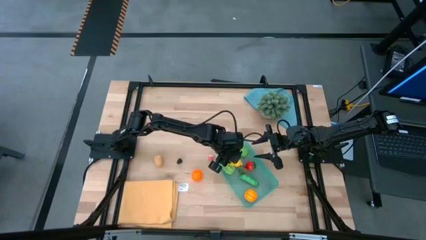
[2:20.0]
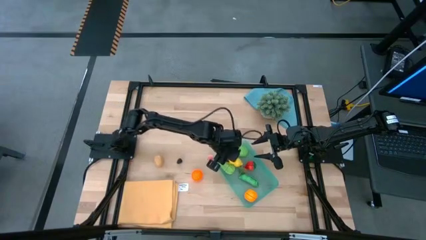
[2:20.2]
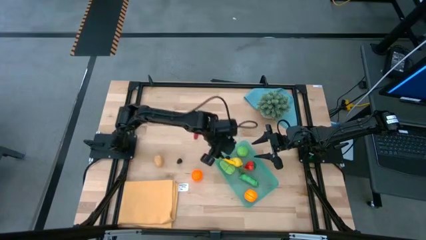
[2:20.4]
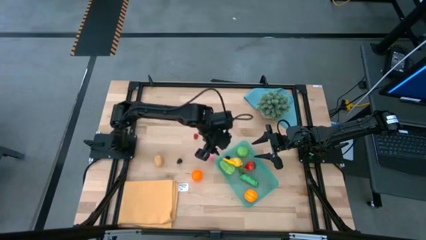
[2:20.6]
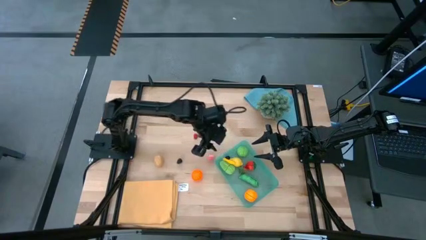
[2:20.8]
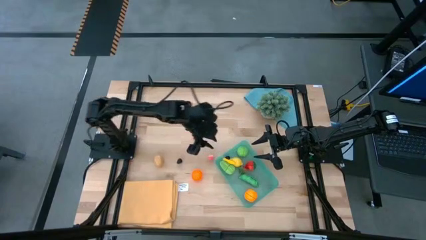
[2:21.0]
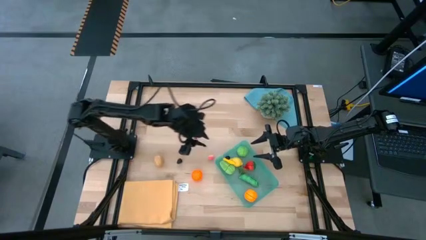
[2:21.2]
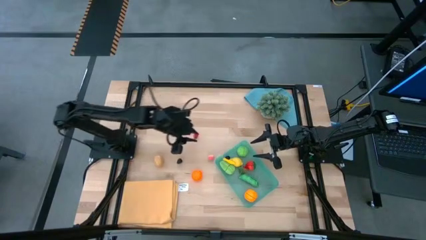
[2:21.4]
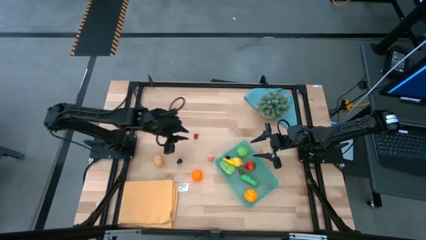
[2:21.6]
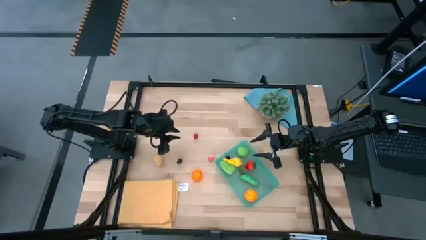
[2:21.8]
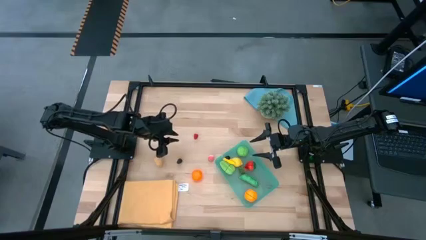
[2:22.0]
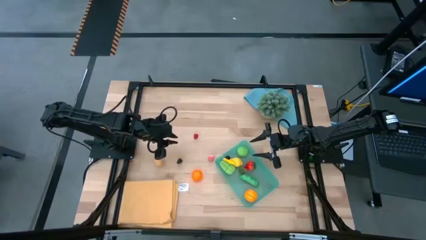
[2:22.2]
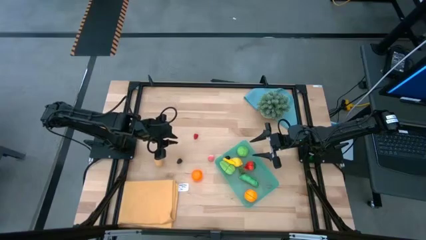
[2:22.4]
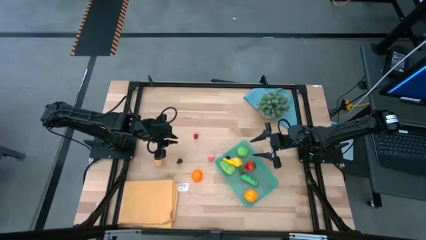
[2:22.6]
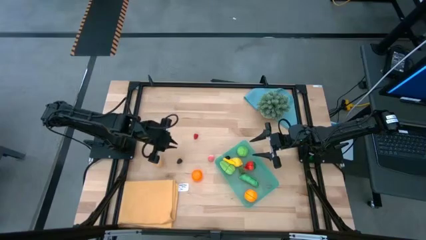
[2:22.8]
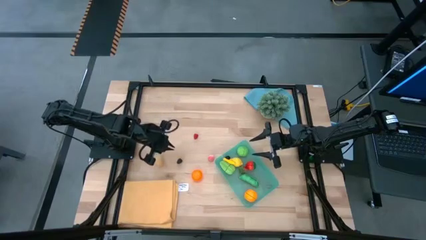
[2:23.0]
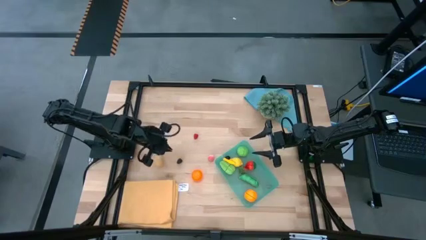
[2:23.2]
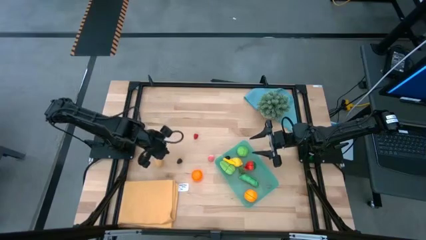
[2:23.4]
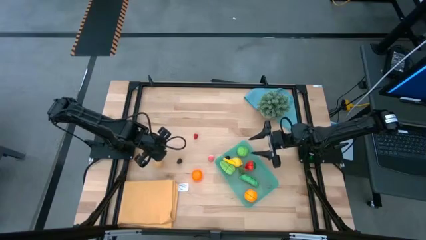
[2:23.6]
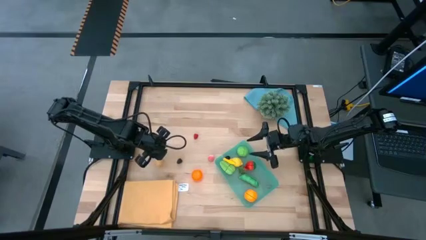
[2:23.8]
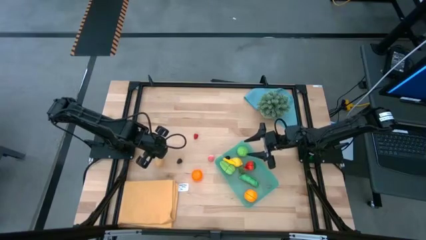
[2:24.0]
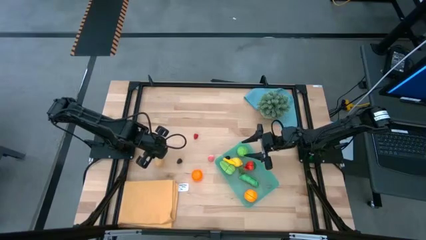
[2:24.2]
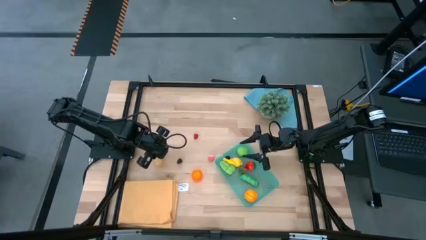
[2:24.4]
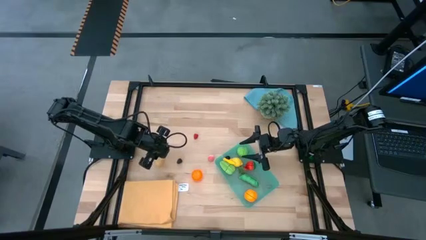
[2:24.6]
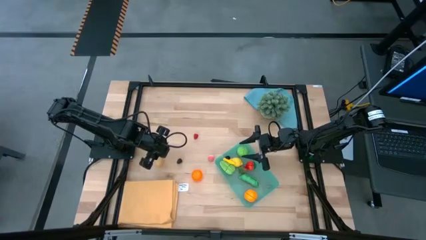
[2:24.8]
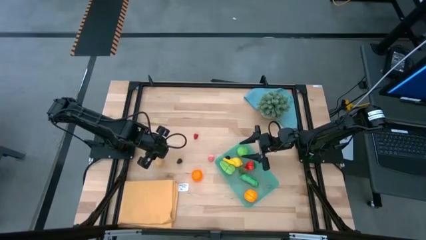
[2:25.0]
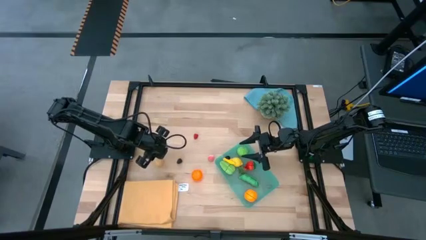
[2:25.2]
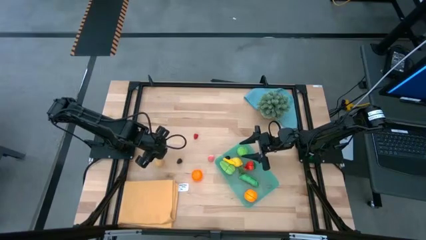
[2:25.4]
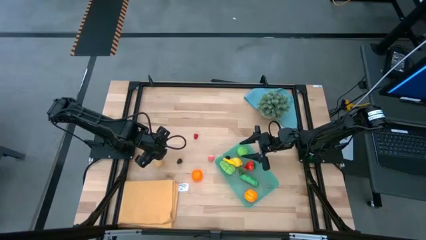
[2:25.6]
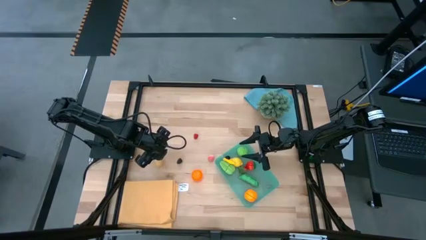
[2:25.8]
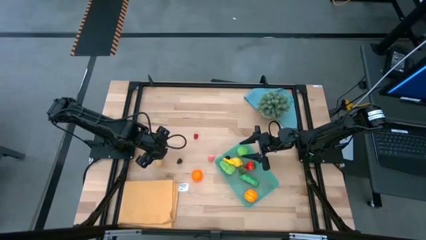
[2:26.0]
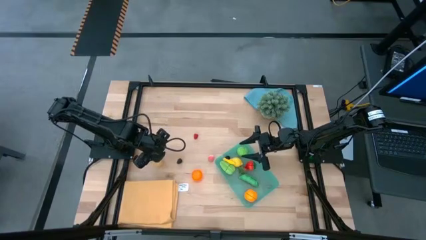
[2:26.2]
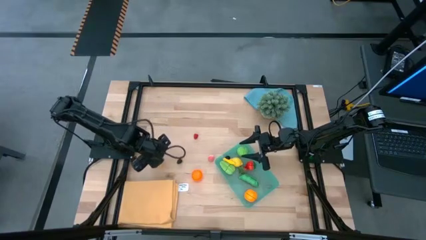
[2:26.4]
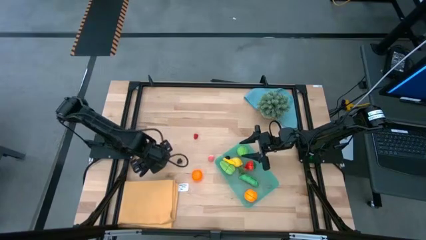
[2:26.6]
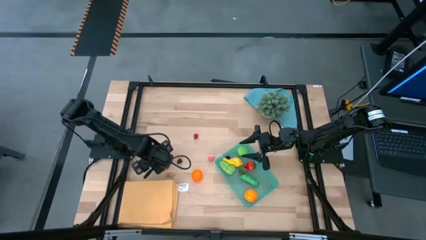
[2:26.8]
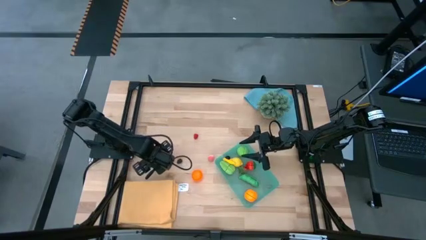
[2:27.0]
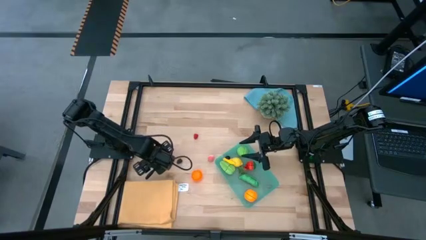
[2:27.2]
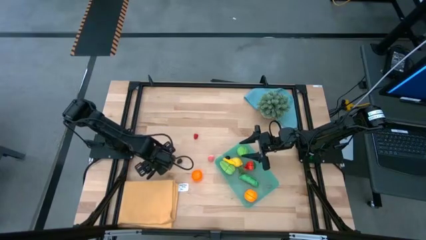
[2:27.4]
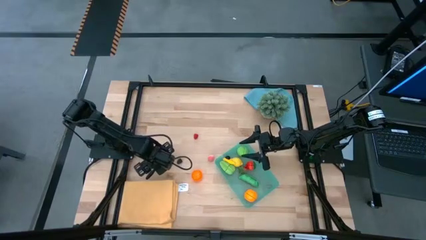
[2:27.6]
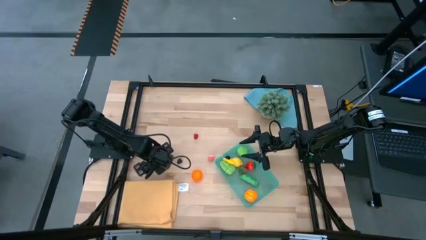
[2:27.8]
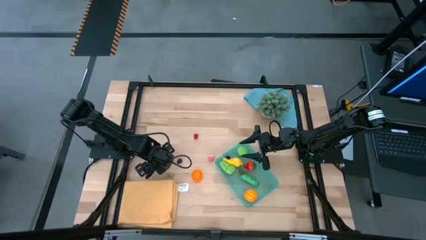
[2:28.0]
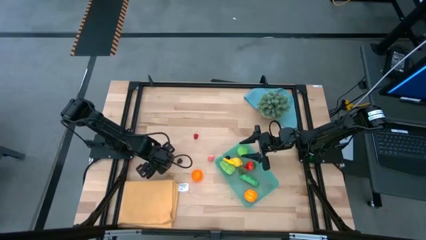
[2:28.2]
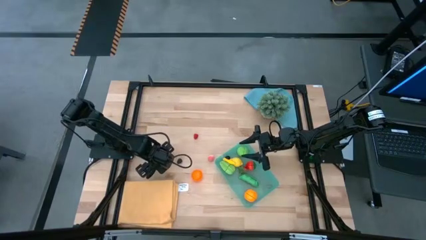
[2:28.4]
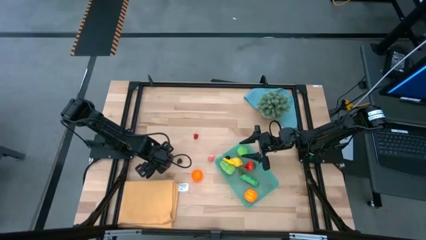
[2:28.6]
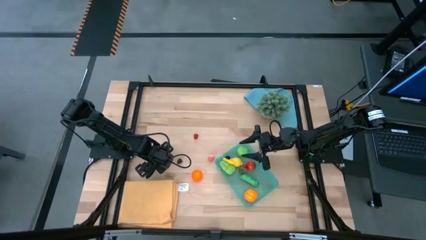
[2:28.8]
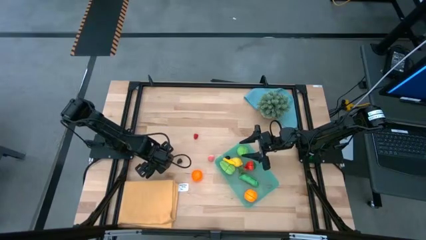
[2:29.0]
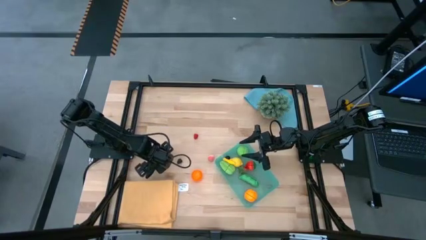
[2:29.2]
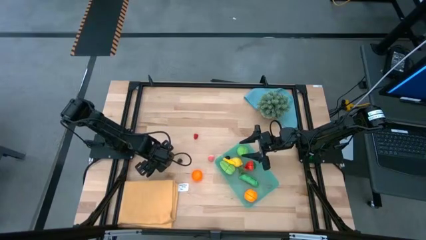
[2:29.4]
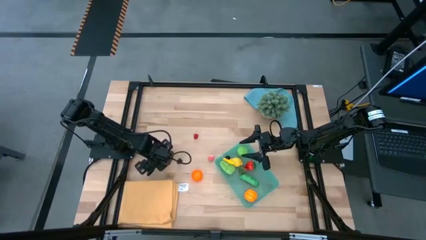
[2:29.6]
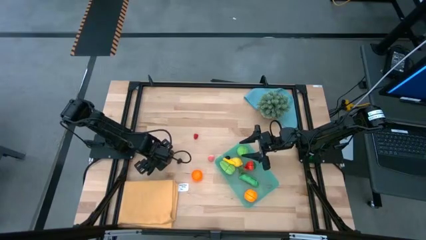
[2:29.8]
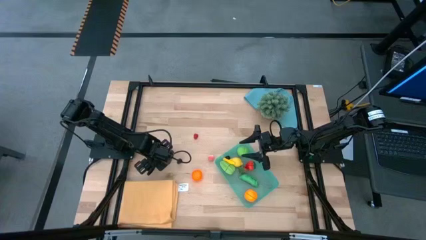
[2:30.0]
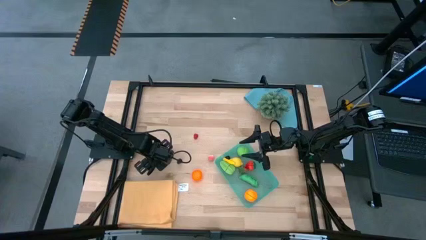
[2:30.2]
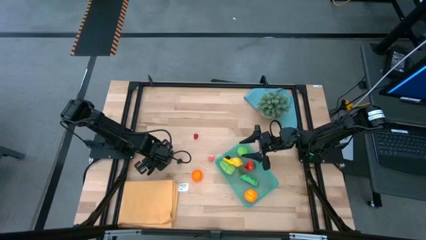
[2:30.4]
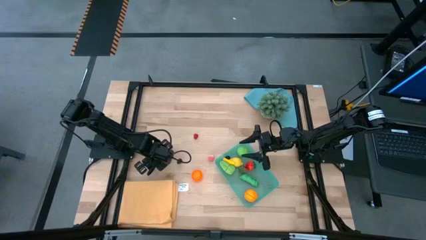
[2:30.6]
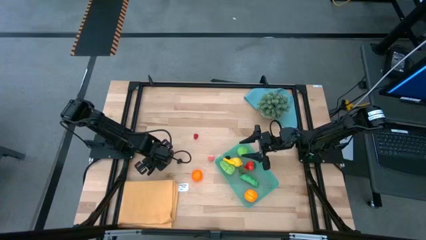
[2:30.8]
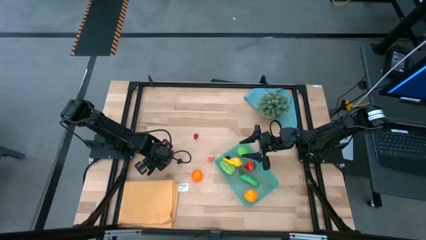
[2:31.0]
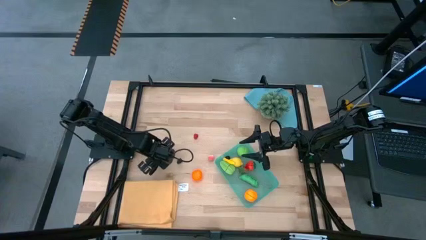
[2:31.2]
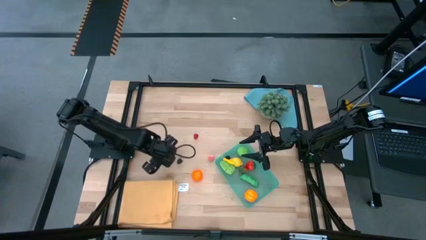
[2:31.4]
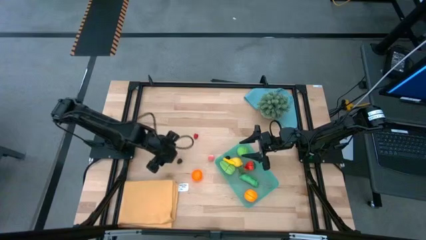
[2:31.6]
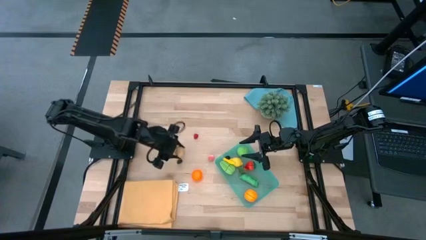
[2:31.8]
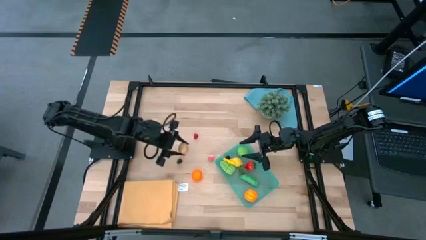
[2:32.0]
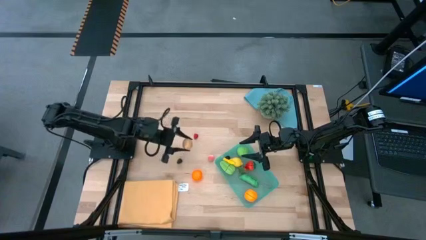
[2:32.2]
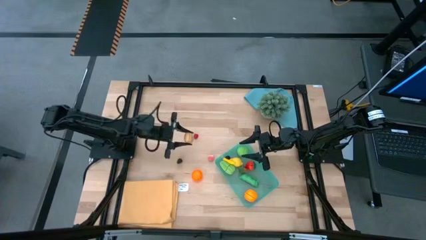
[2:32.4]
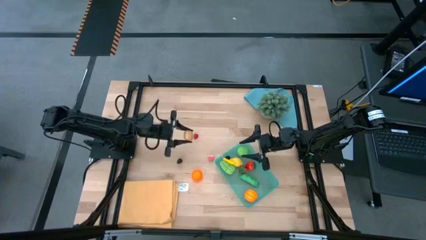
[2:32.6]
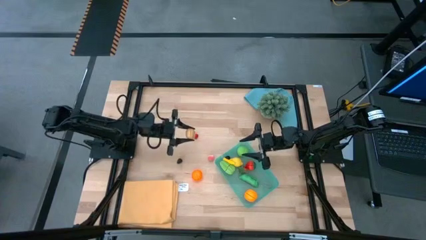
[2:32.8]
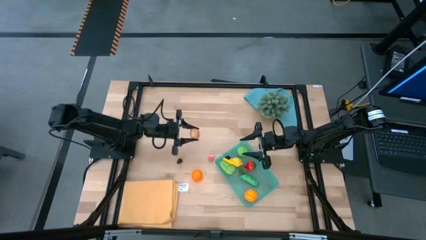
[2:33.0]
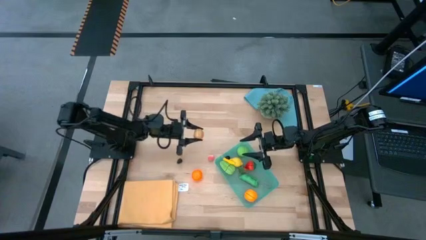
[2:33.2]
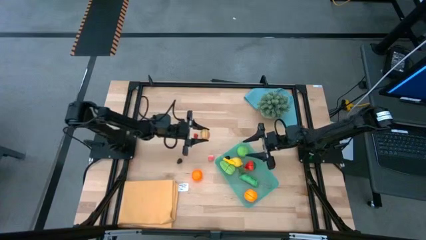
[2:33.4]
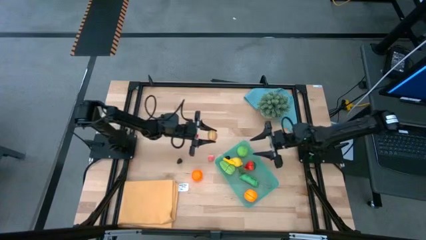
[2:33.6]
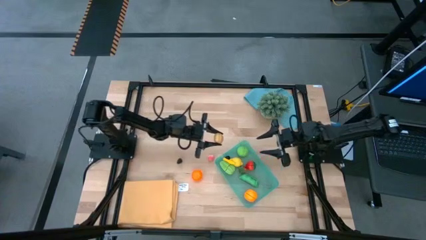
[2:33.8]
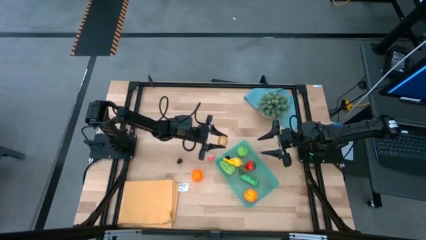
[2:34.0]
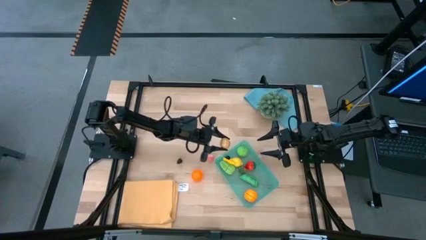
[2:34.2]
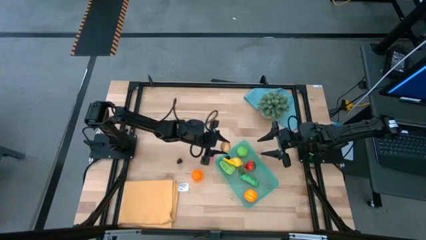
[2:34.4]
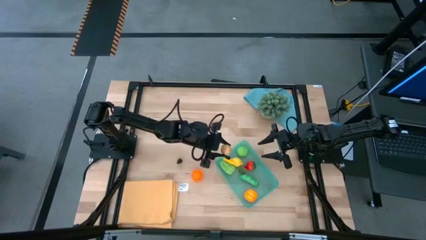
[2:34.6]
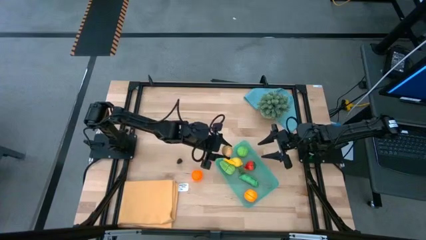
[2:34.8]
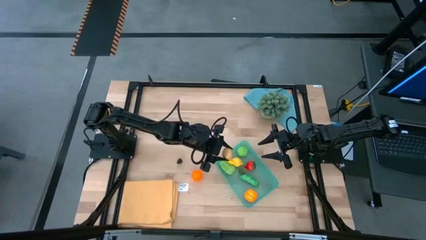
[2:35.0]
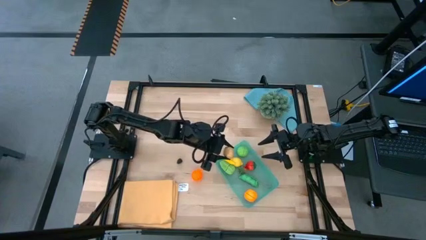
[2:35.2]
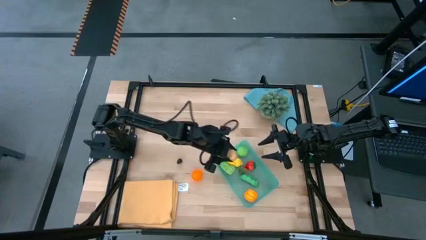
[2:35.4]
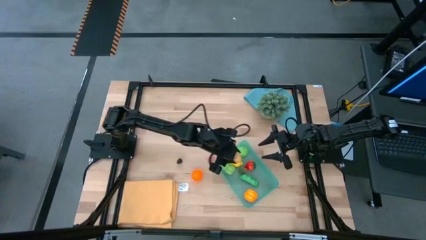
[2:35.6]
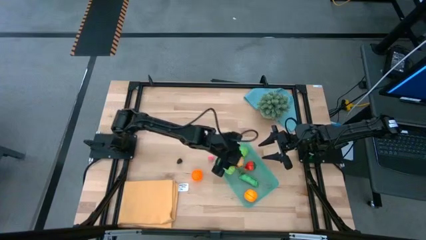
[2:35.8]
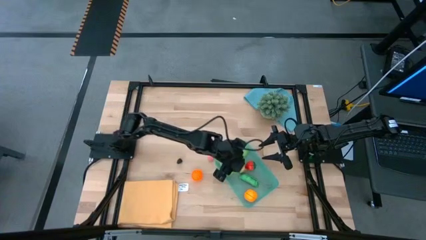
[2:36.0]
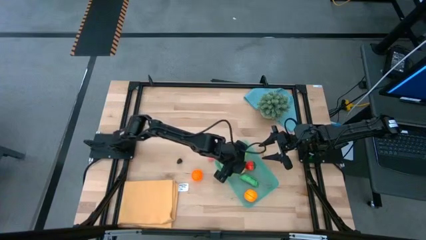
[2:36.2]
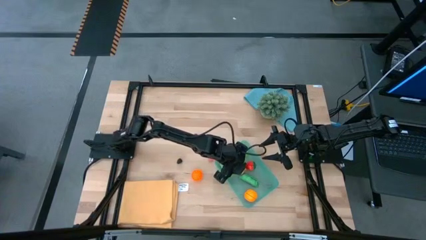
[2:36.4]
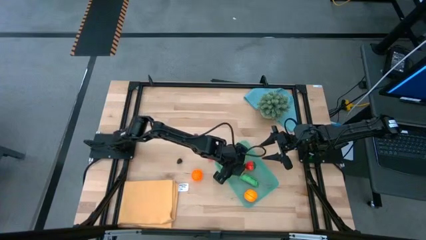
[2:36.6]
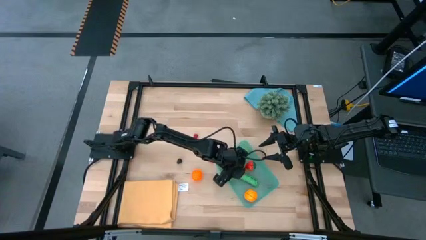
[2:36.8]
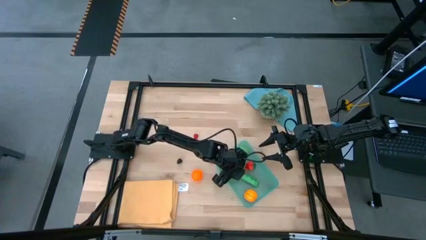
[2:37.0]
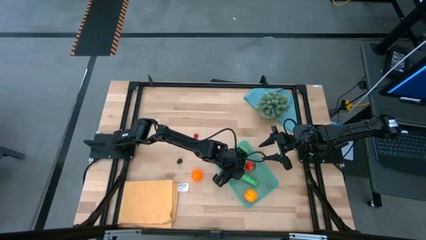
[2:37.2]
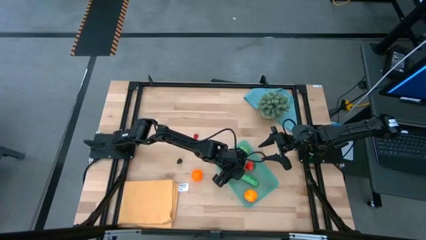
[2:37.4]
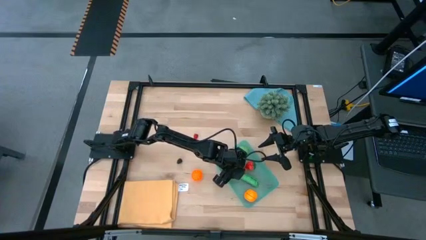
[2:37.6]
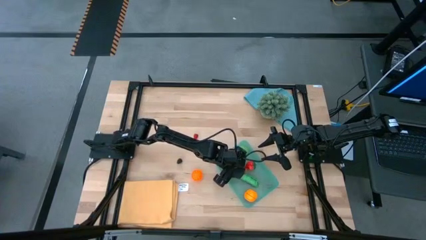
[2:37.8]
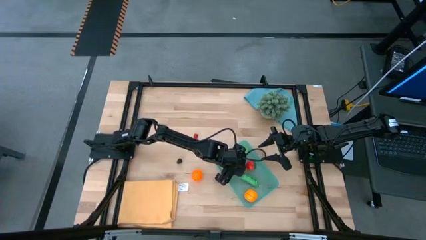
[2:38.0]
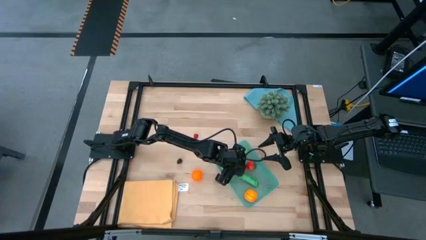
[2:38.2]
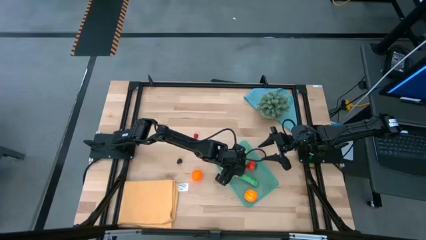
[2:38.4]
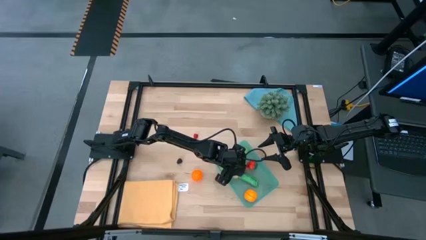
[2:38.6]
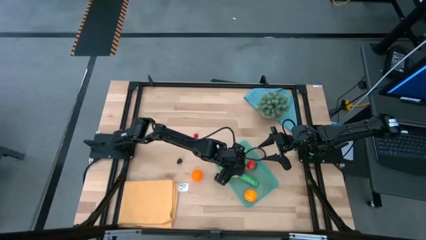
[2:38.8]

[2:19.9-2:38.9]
Task: Pick and placing Produce into tupperware
Put the potato into the green bin
